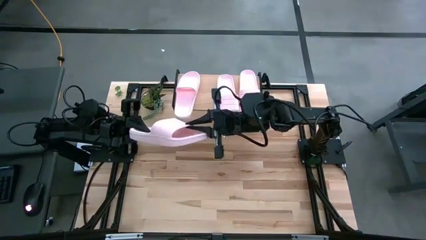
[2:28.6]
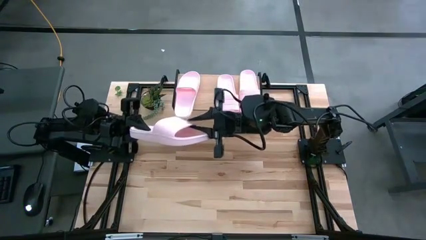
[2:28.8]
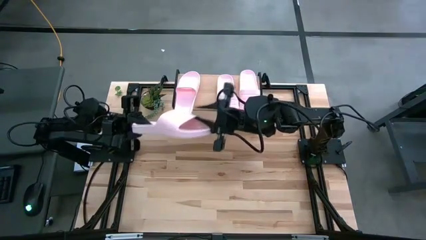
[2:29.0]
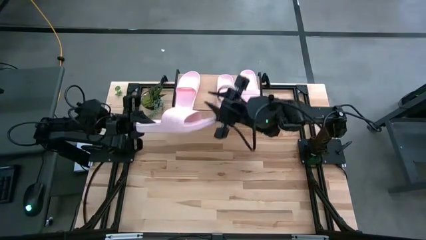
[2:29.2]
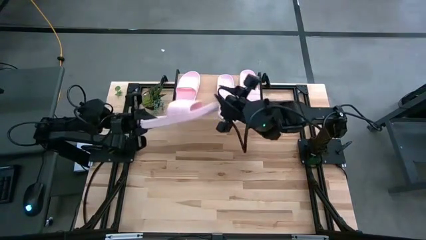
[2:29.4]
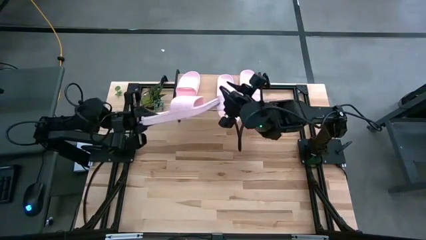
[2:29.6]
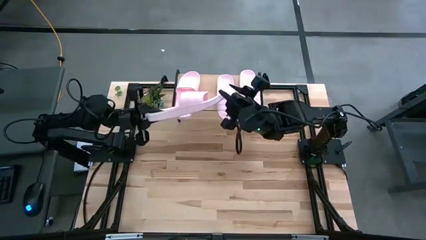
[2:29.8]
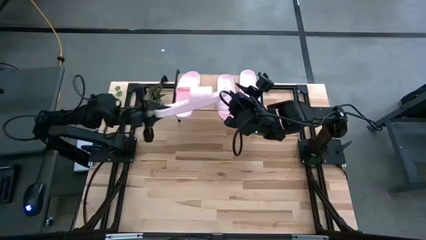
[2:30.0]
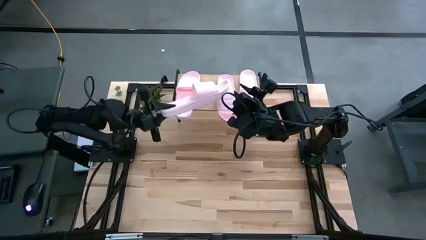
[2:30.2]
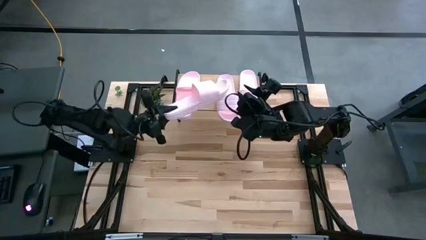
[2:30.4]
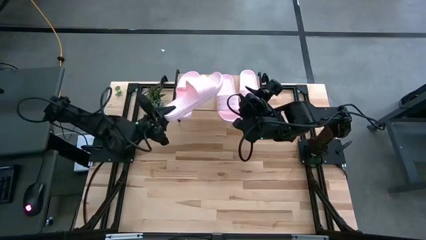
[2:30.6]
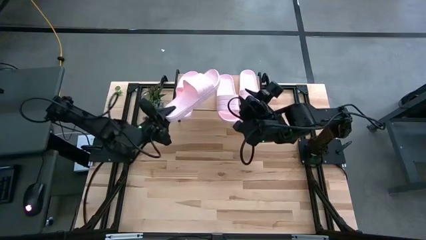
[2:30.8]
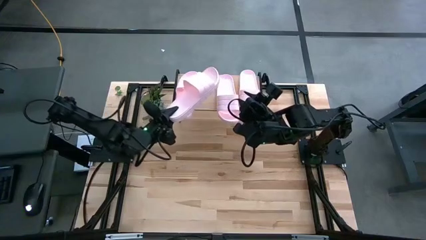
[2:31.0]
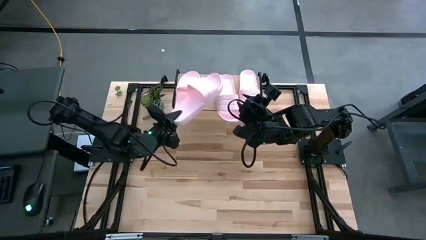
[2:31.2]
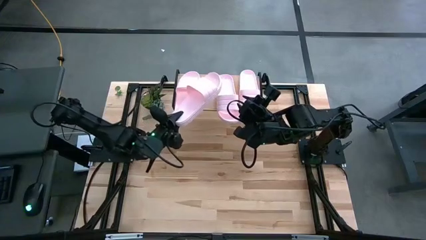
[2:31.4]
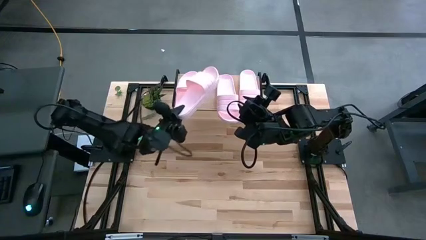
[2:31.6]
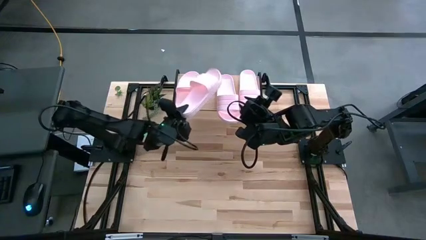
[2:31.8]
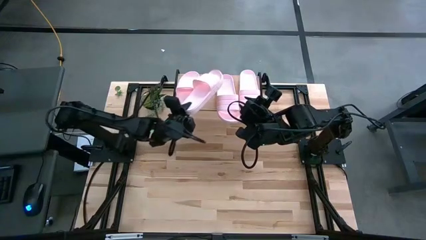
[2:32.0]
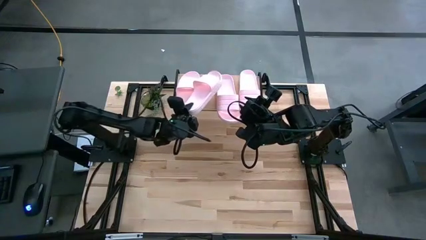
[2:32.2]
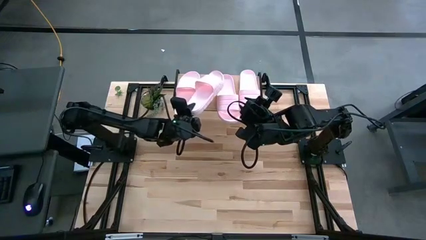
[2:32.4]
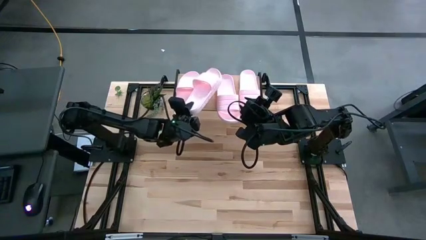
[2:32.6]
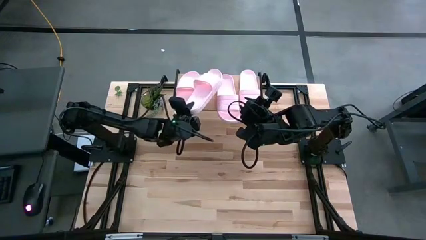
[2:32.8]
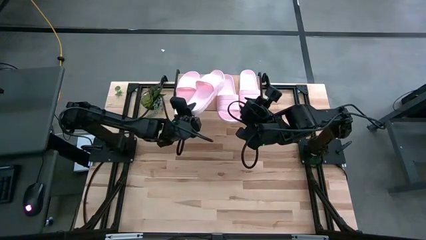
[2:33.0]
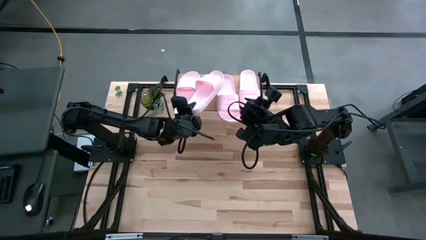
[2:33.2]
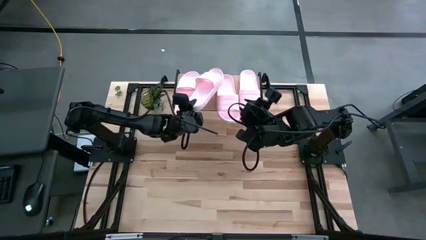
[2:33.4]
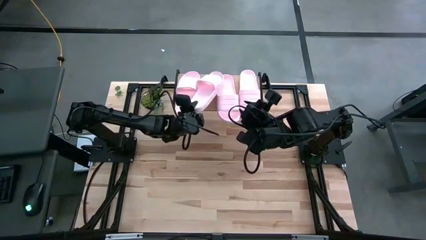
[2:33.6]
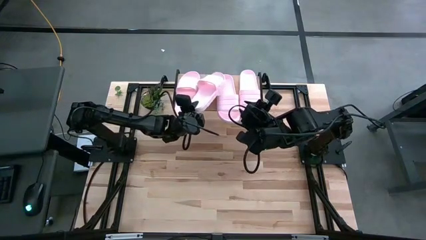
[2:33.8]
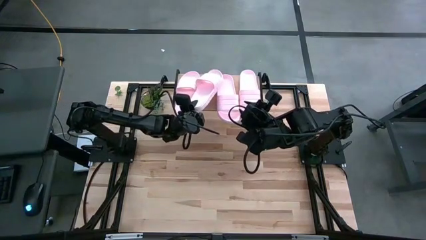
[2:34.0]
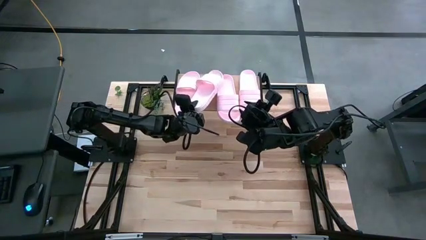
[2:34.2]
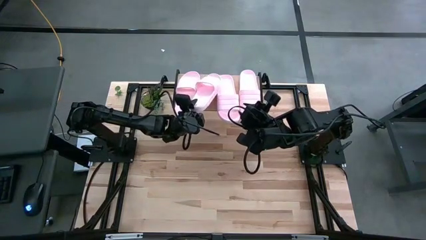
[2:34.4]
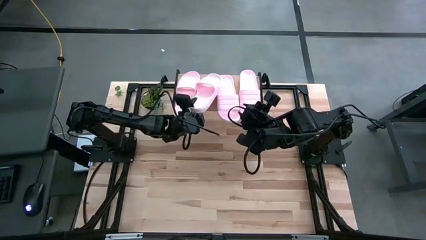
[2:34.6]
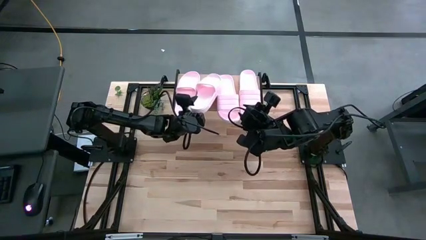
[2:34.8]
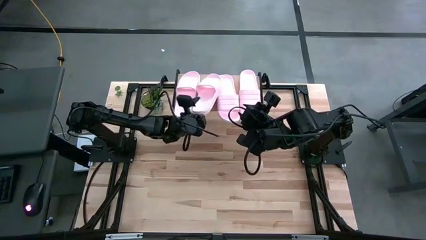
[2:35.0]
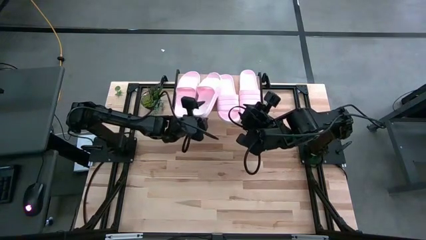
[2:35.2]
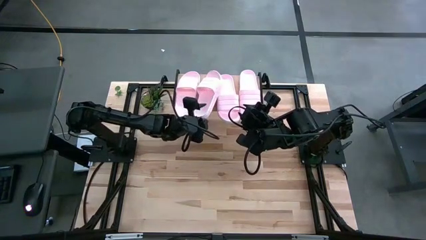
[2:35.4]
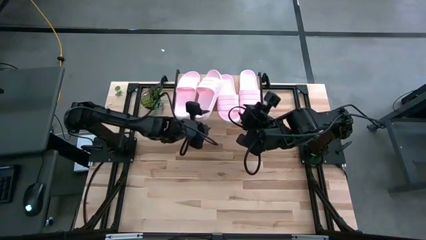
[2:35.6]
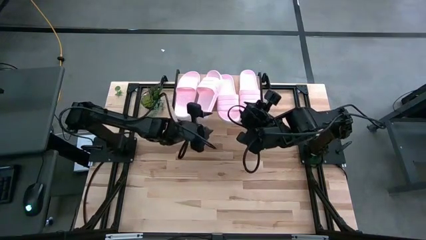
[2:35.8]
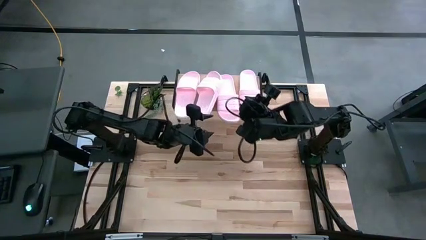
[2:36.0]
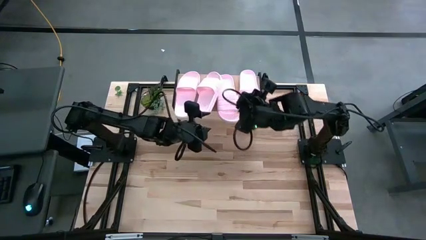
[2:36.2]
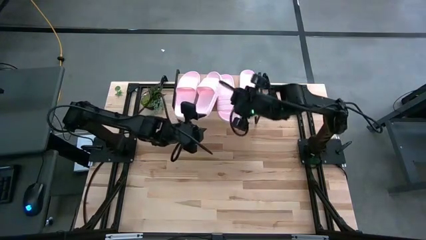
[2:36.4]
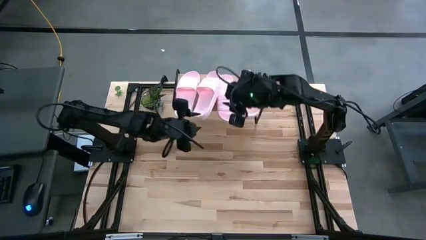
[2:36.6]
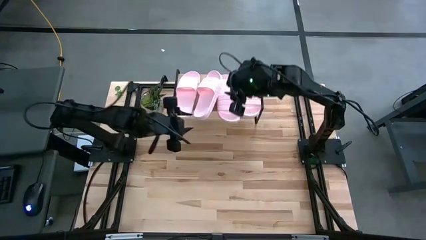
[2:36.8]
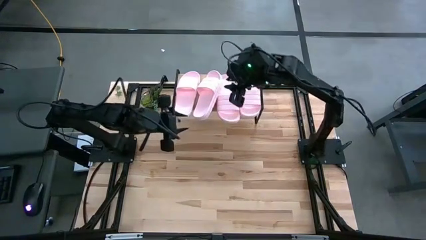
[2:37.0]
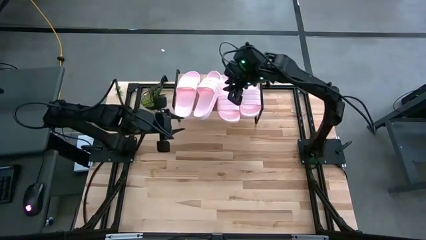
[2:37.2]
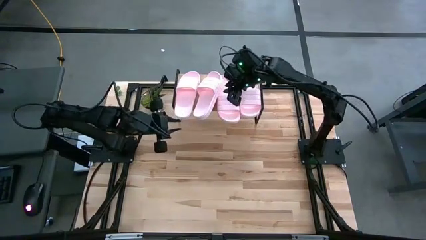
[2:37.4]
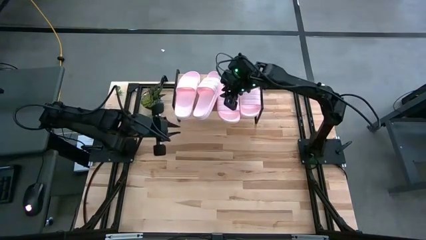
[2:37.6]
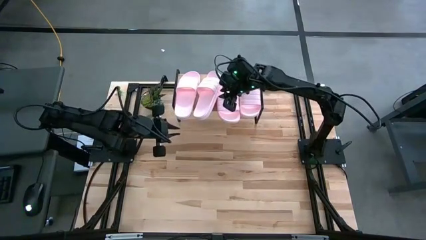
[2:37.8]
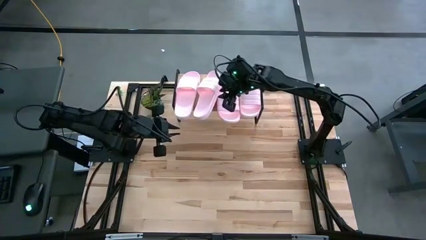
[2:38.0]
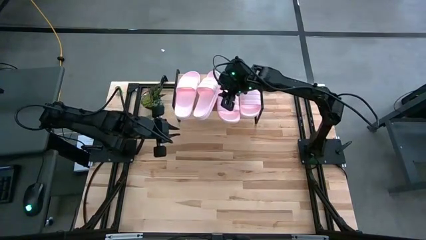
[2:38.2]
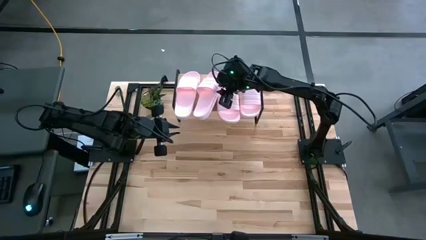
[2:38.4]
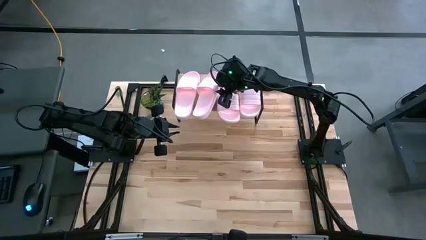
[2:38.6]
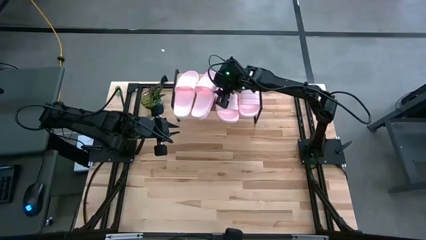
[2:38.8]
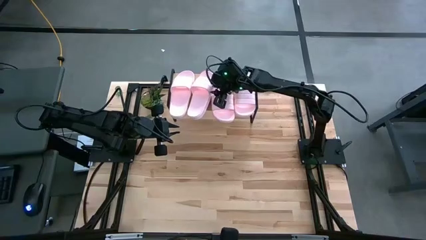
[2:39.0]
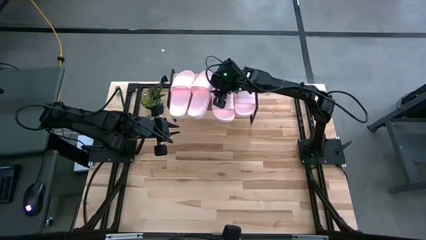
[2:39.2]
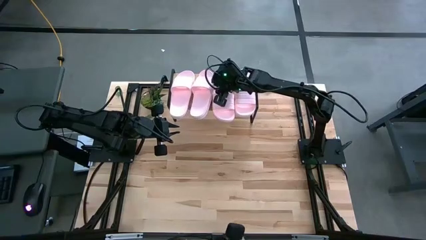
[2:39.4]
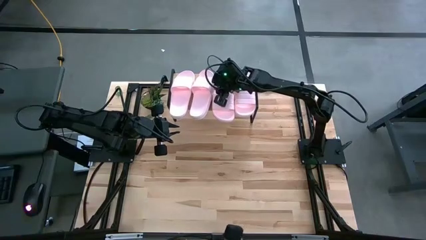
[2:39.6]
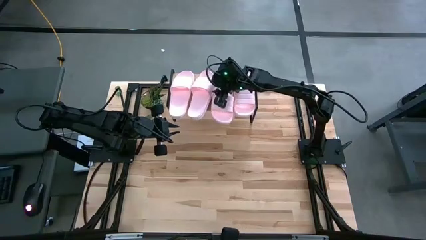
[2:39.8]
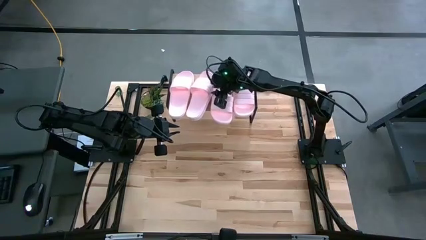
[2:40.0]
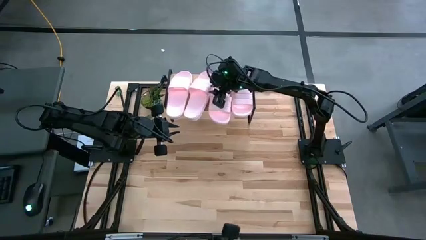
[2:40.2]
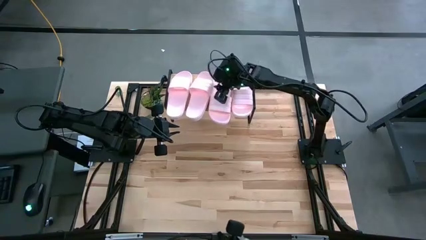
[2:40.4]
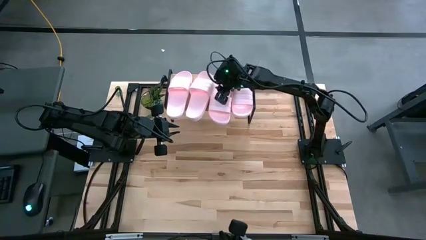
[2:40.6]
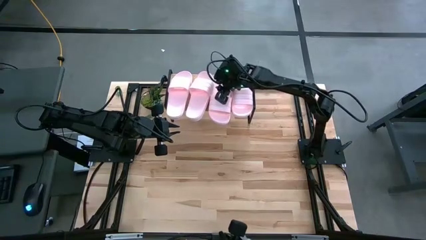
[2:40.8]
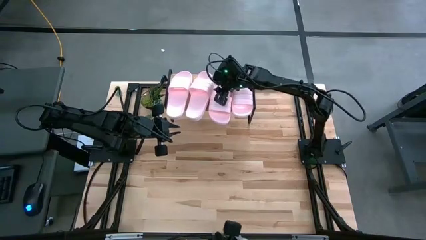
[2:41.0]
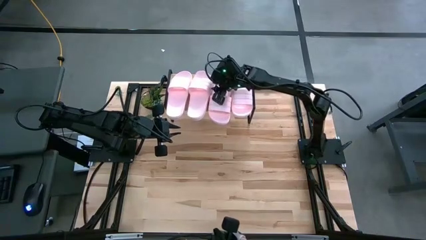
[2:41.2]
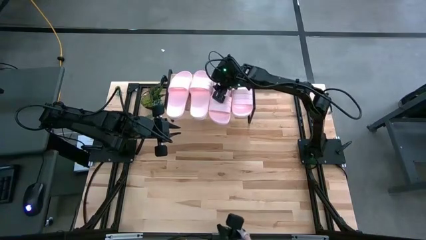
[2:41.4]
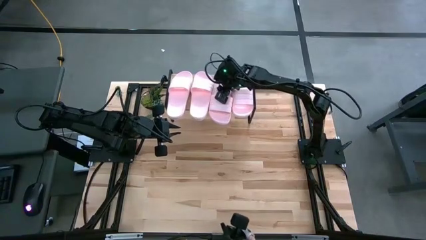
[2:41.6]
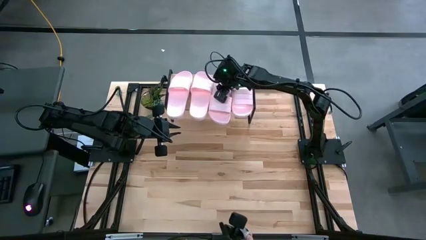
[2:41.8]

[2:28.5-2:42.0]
Task: Pick and place slides into the shelf
Adjust the pink slide
